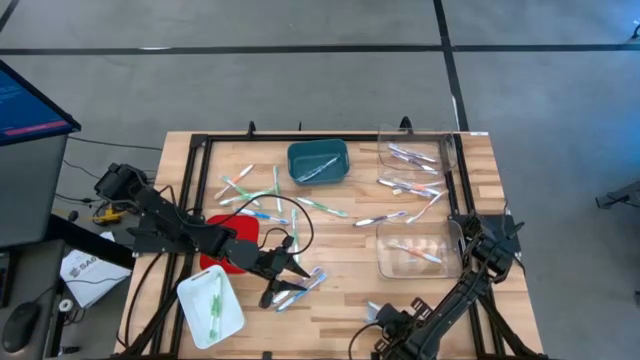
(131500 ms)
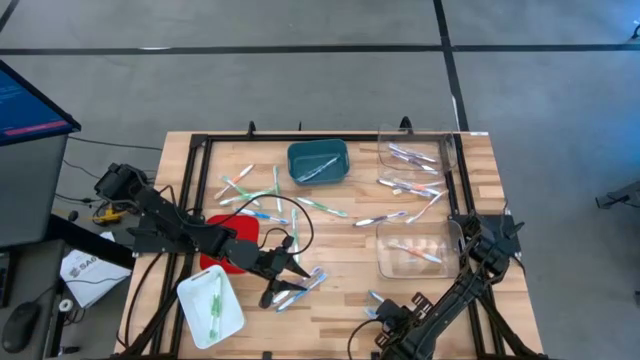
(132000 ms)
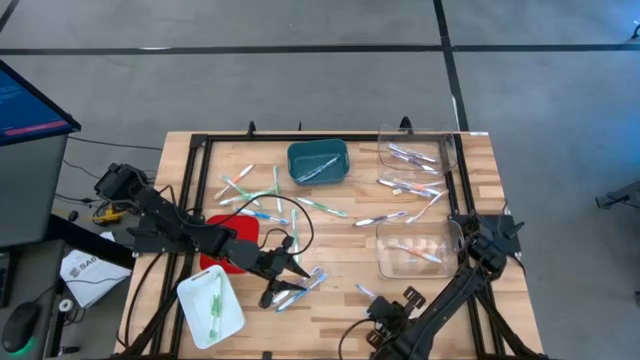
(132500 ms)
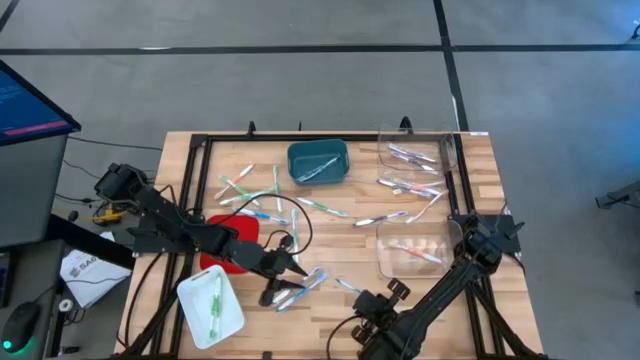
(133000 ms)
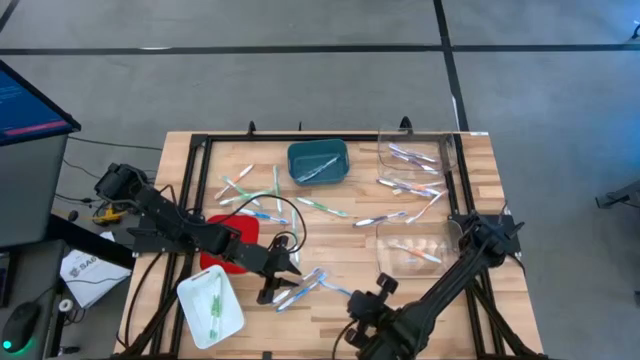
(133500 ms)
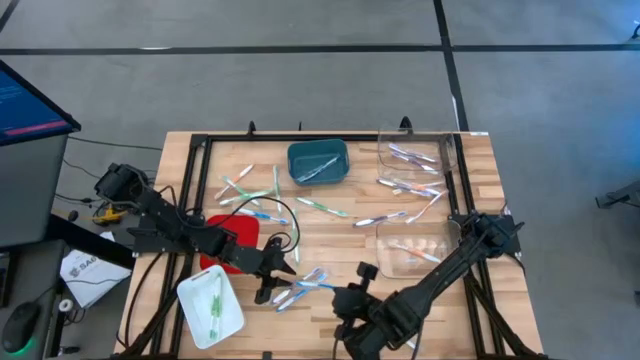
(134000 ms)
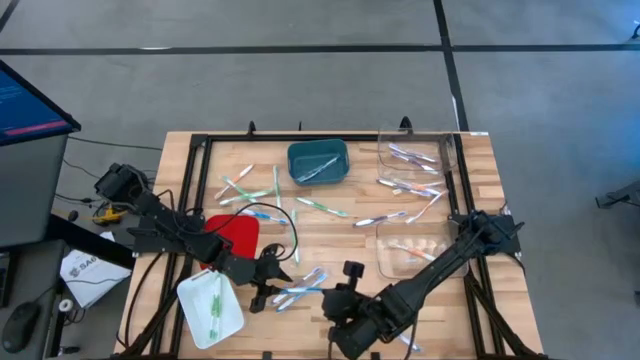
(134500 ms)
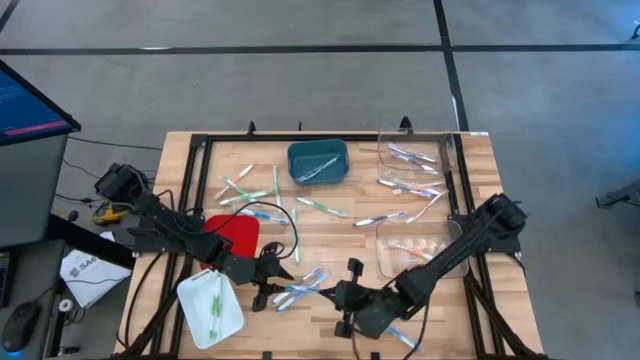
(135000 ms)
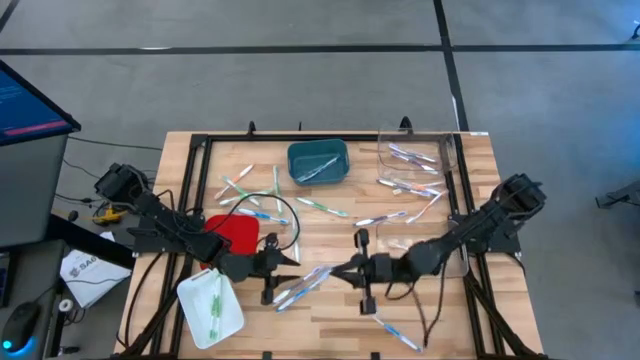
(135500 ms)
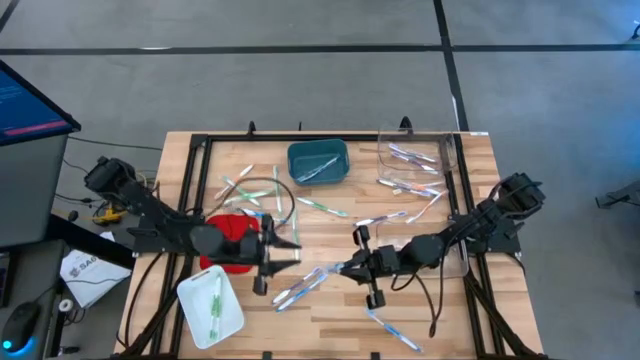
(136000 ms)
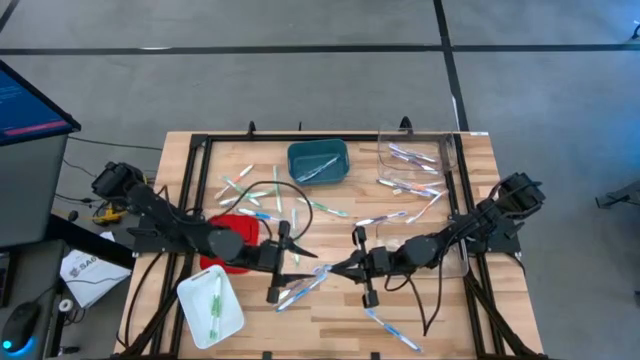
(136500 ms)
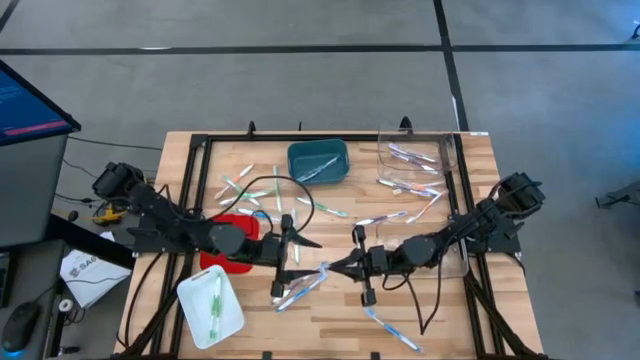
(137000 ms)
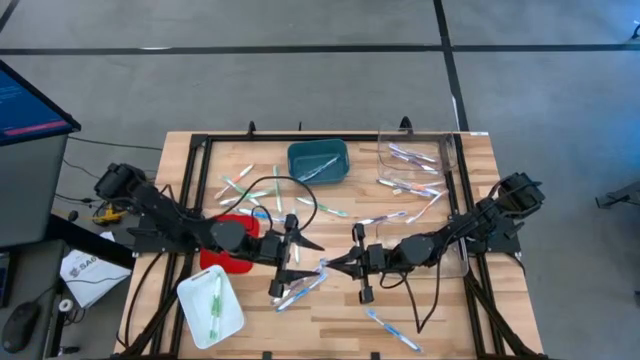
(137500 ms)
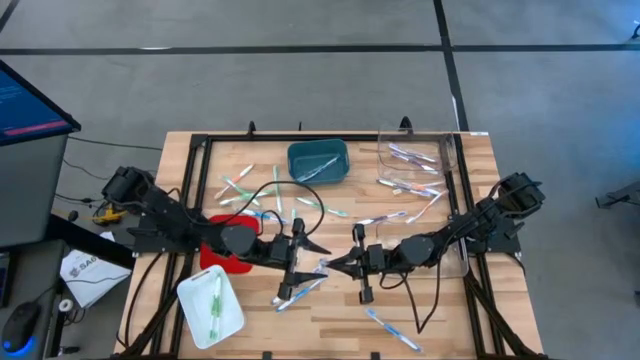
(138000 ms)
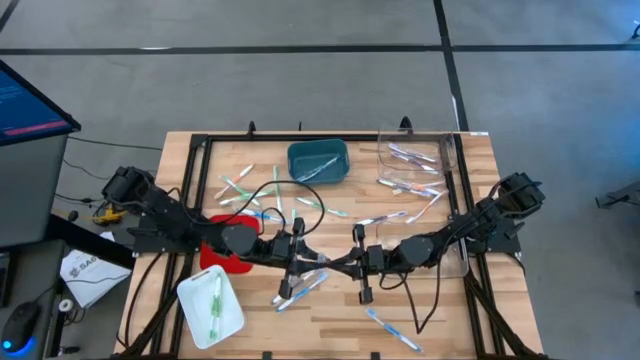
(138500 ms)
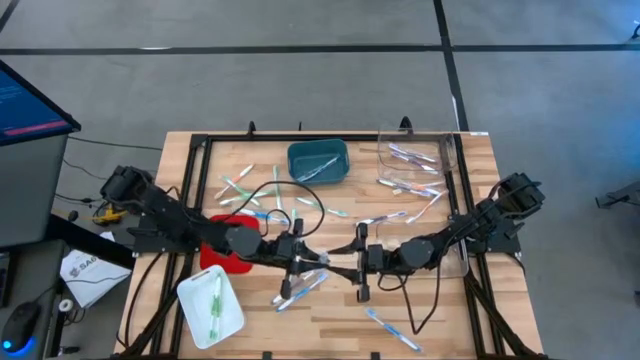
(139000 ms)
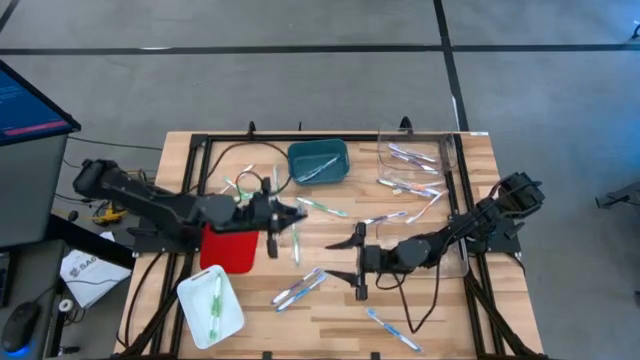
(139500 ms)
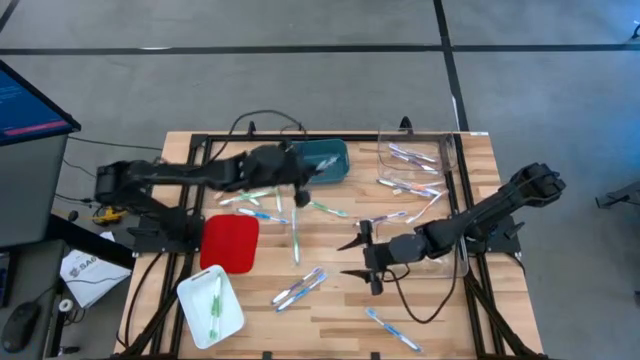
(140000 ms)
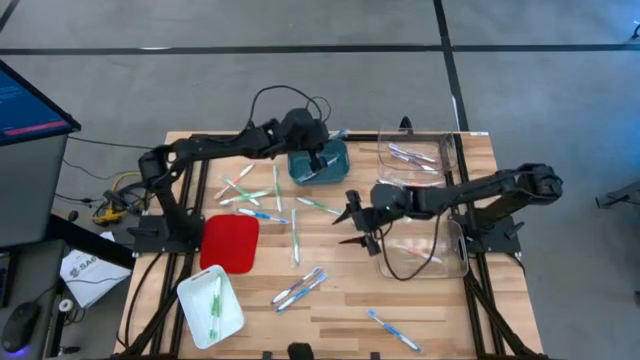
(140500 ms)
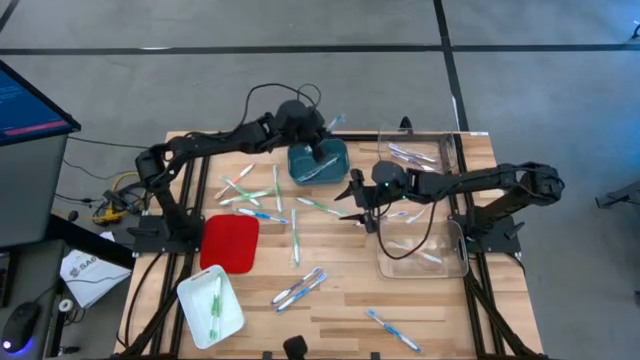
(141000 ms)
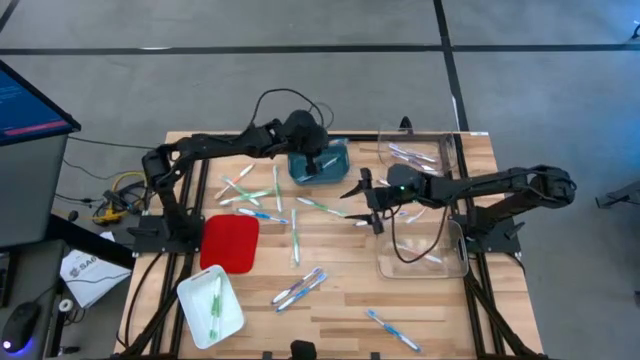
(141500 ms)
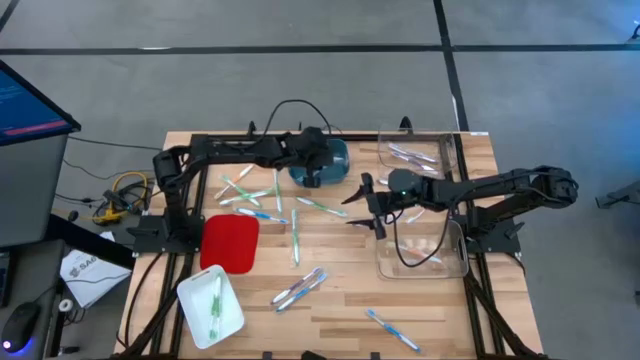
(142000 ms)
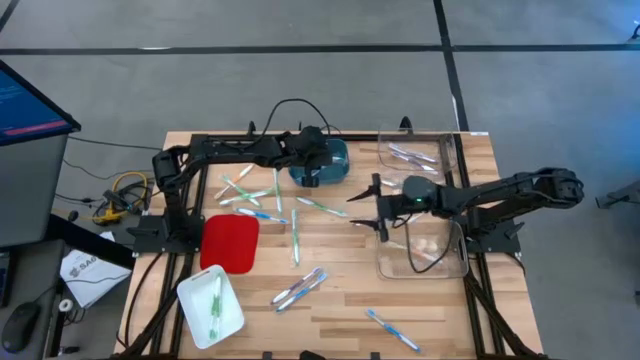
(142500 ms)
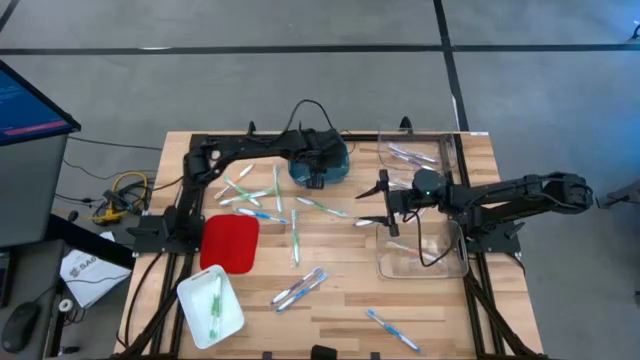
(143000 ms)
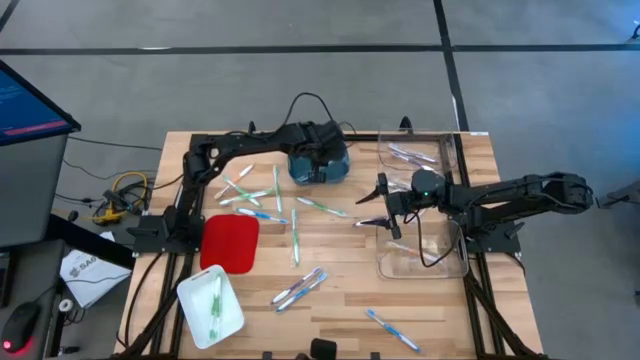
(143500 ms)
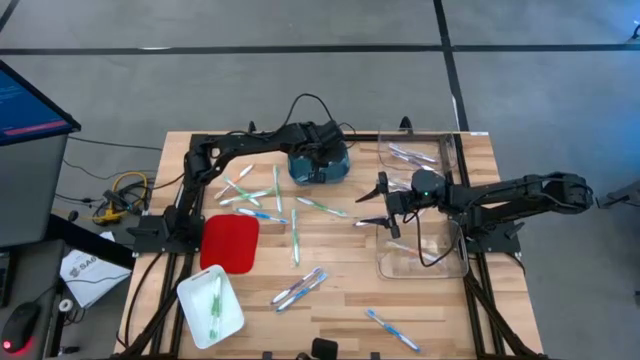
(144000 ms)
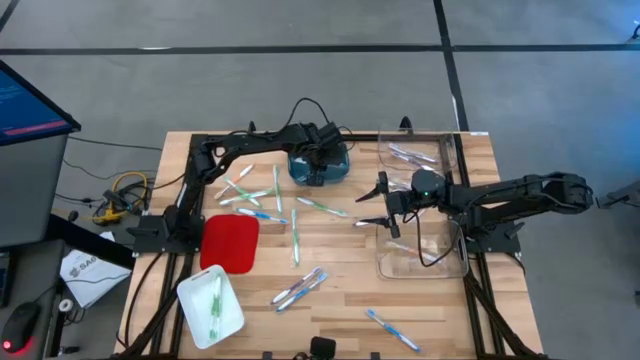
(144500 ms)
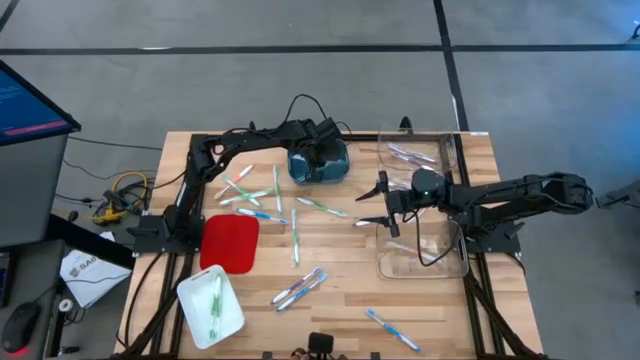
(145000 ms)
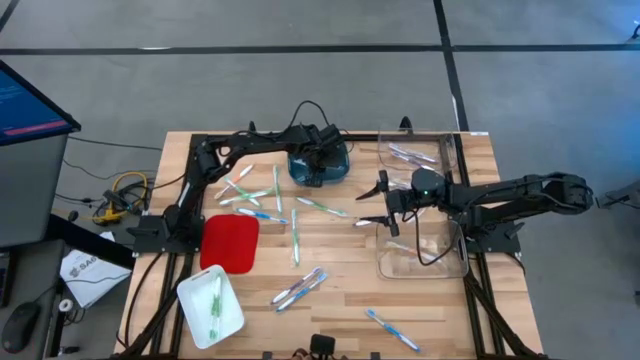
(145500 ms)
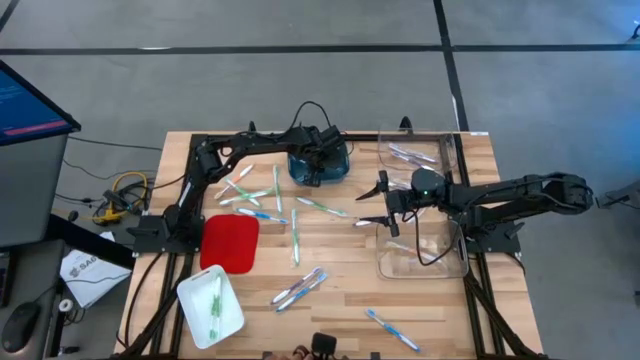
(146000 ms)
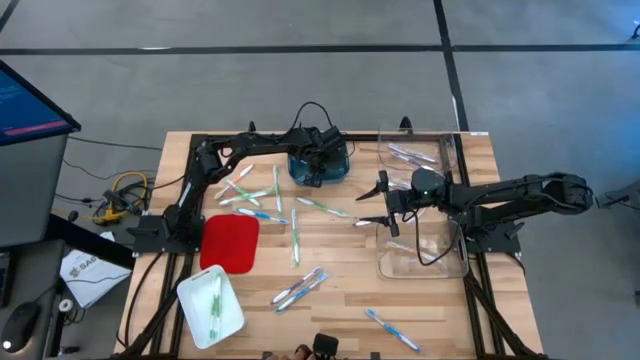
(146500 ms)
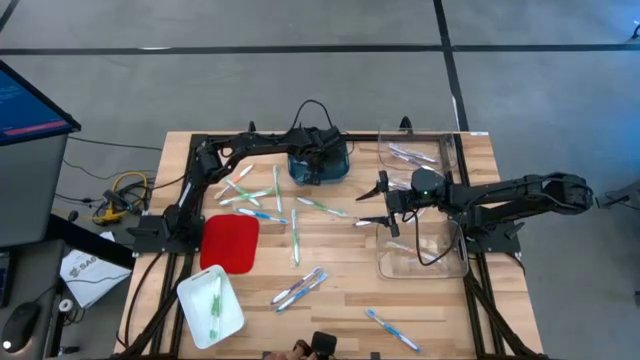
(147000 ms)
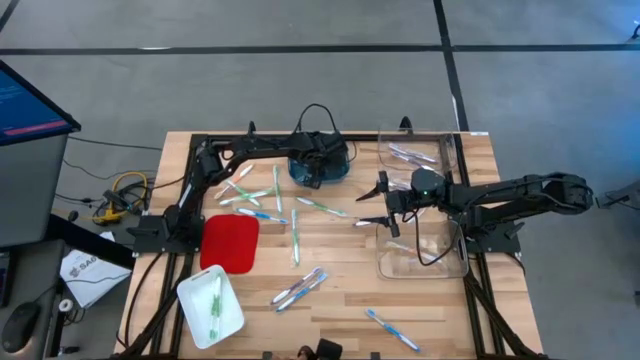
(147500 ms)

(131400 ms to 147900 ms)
Task: Pick & Place Toothbrushes
Put the blue toothbrush into the blue bin

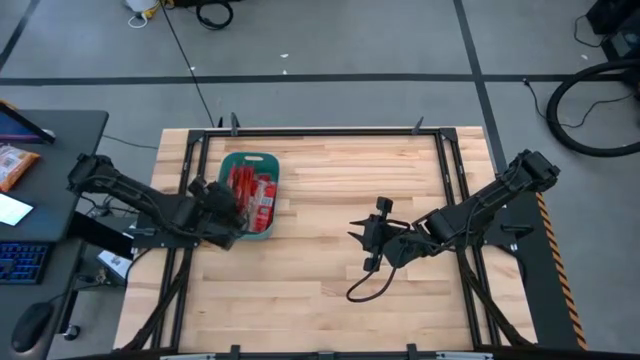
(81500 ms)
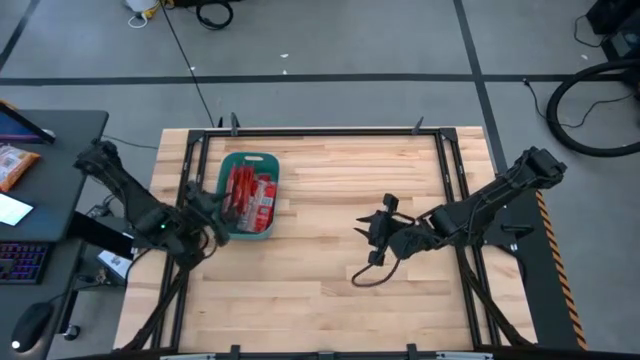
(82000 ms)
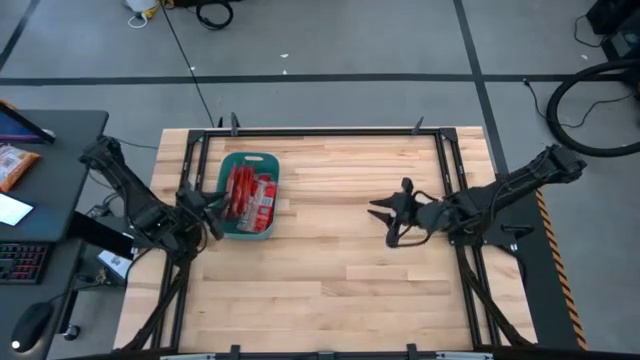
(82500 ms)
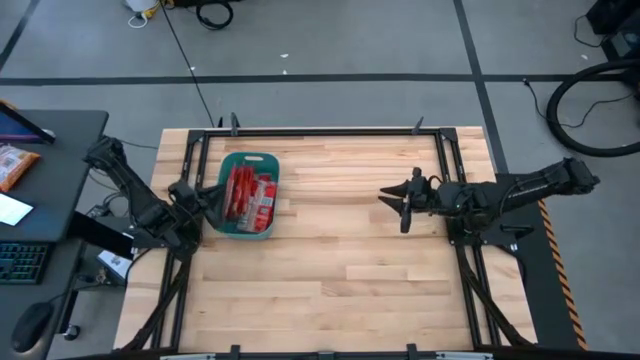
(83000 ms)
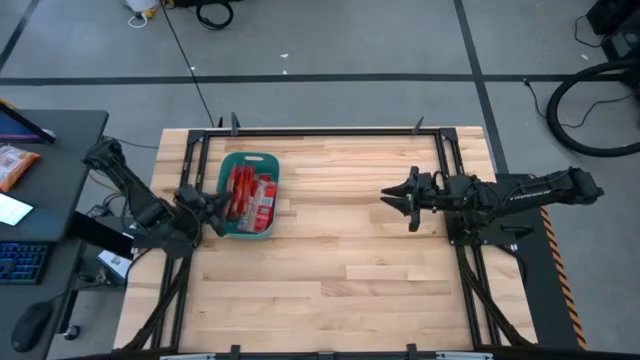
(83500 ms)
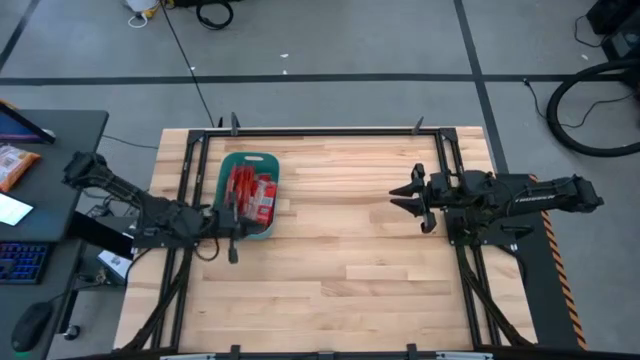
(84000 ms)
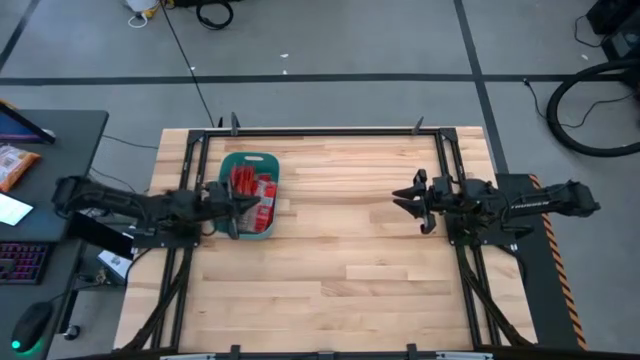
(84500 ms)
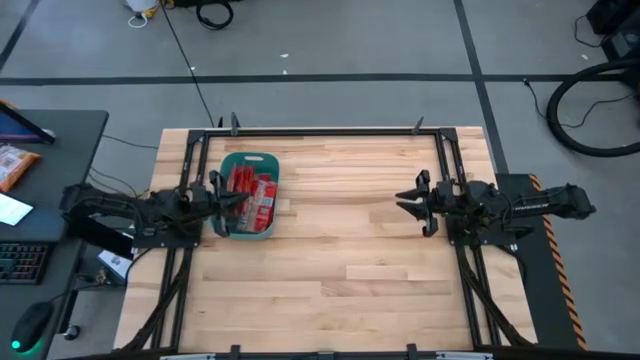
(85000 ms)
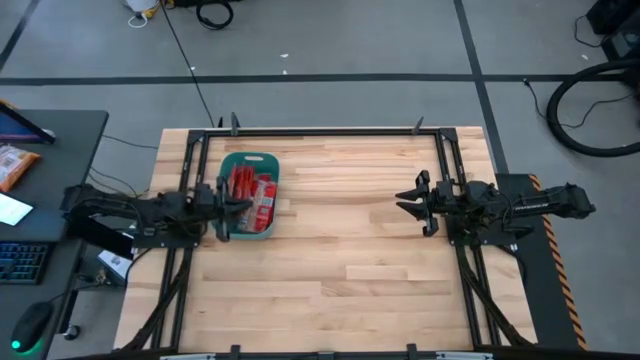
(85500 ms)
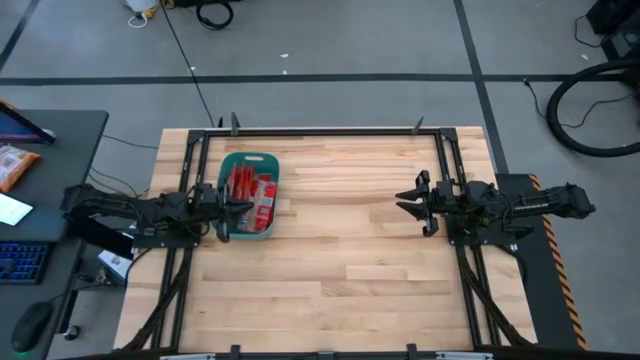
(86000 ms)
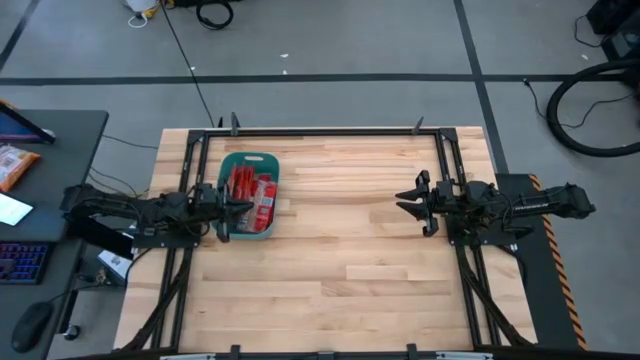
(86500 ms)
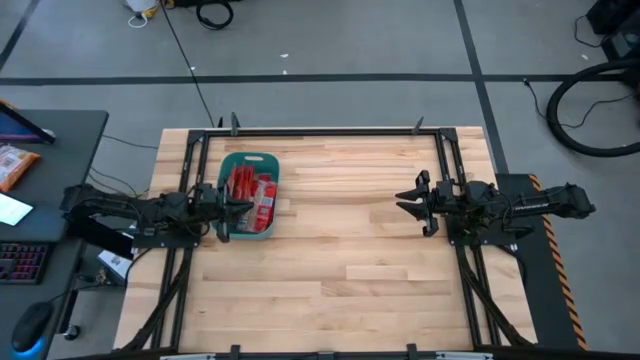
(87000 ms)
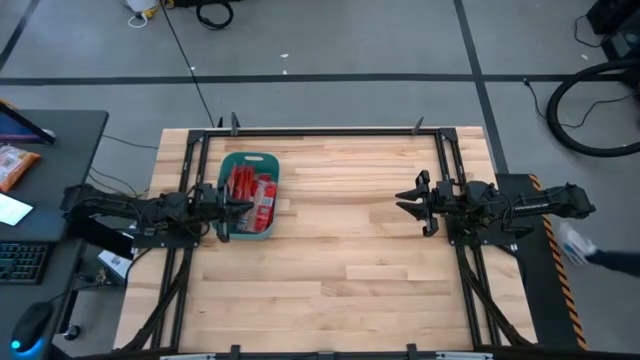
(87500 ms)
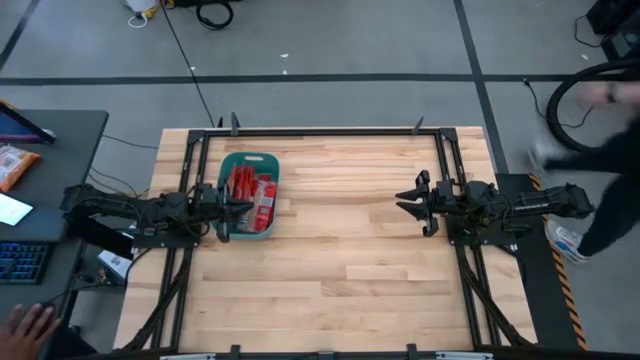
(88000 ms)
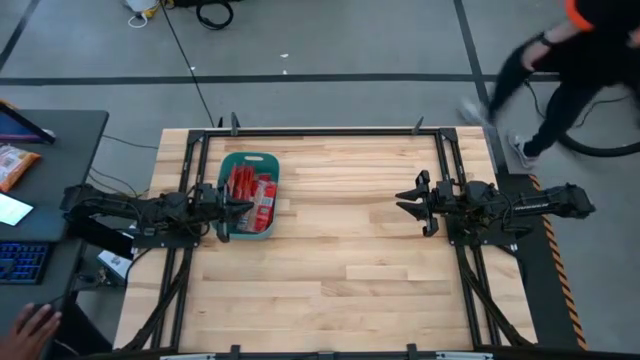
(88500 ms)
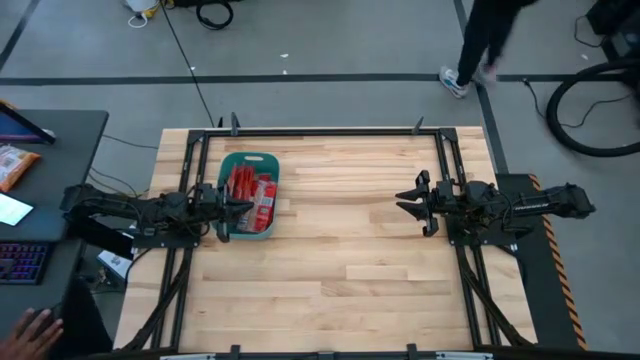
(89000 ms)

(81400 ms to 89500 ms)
Task: Sort popcorn bags into baskets
Return to Home Position
